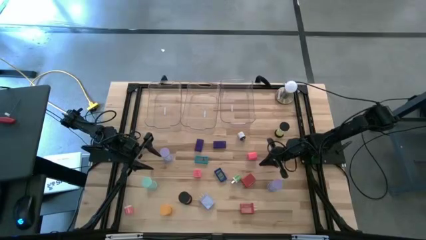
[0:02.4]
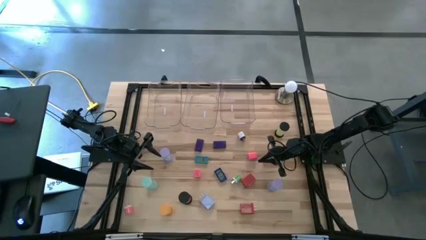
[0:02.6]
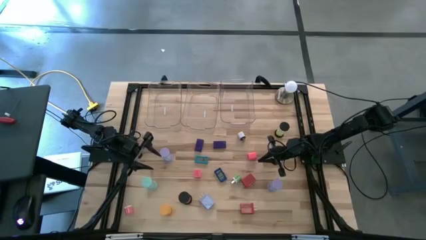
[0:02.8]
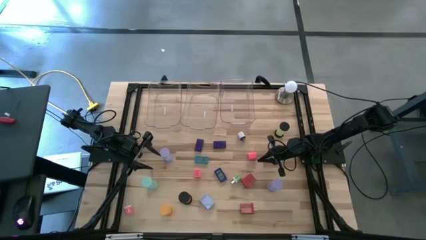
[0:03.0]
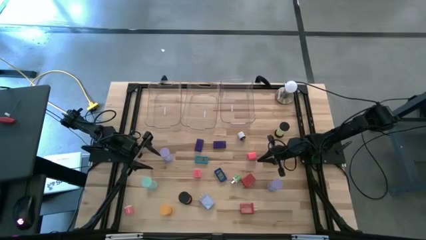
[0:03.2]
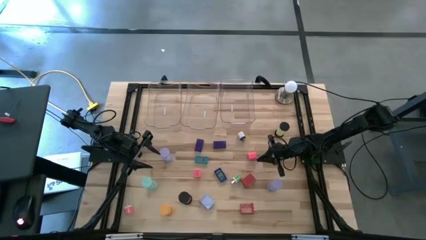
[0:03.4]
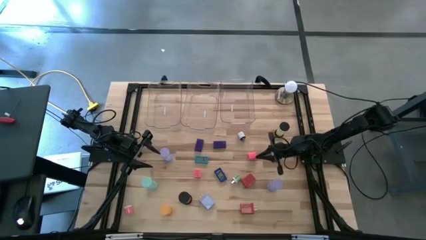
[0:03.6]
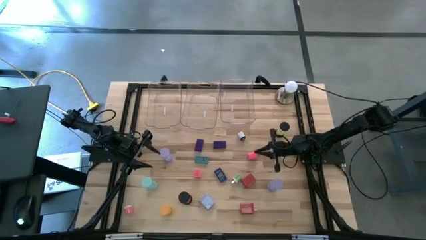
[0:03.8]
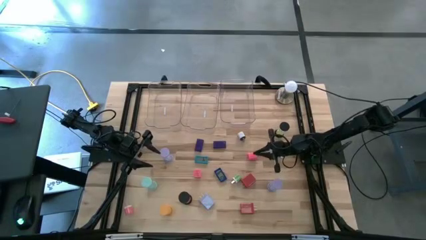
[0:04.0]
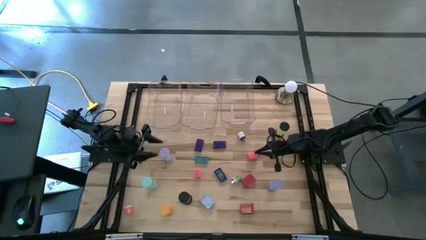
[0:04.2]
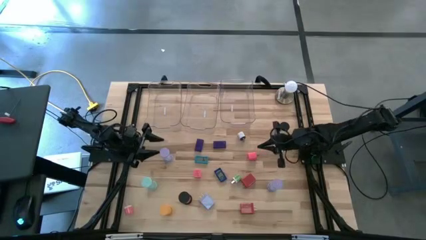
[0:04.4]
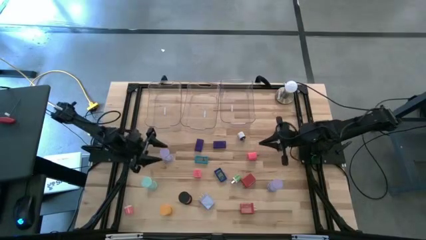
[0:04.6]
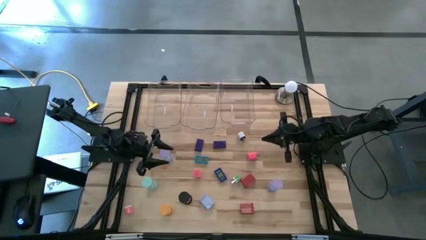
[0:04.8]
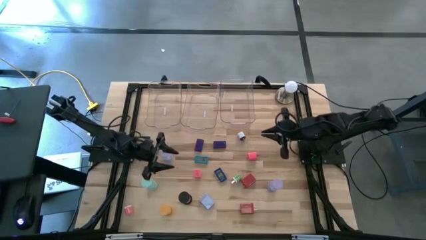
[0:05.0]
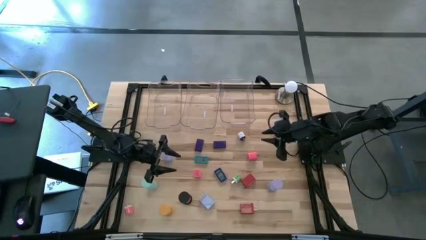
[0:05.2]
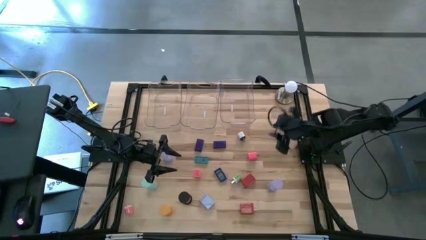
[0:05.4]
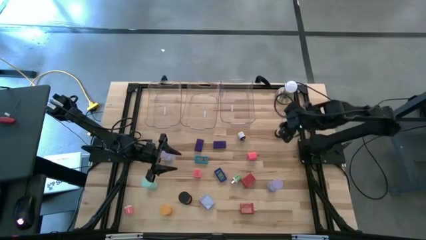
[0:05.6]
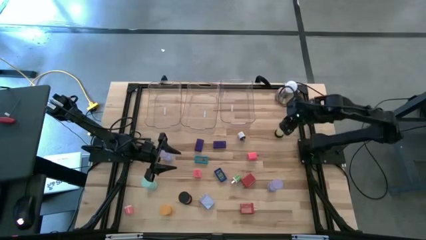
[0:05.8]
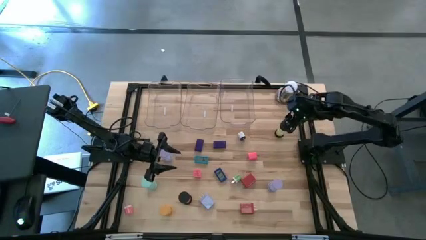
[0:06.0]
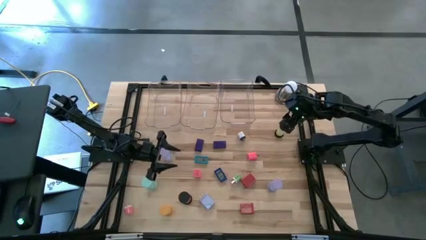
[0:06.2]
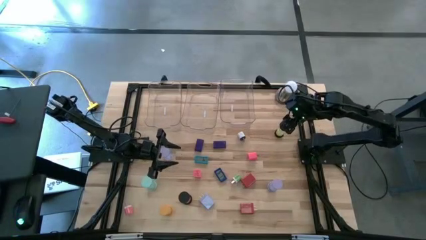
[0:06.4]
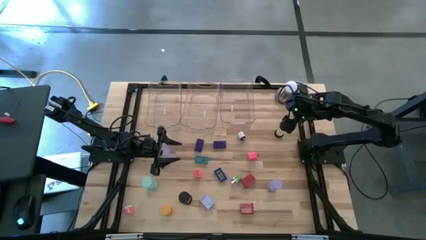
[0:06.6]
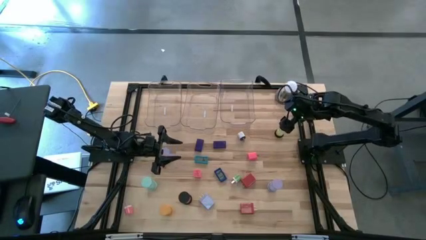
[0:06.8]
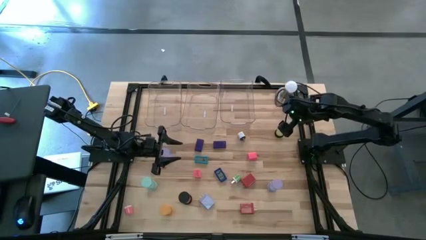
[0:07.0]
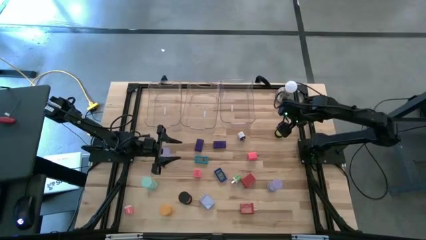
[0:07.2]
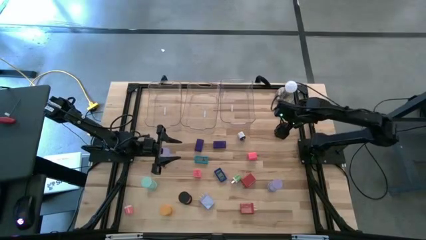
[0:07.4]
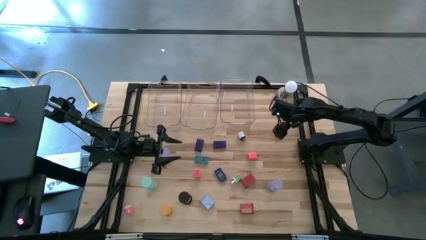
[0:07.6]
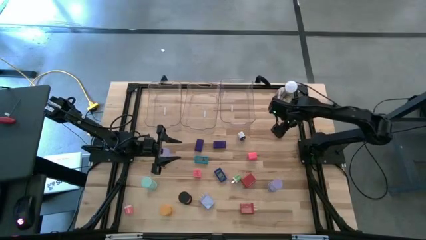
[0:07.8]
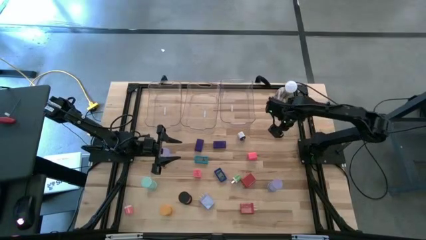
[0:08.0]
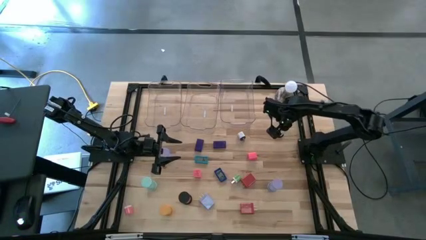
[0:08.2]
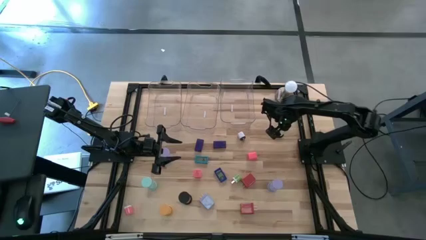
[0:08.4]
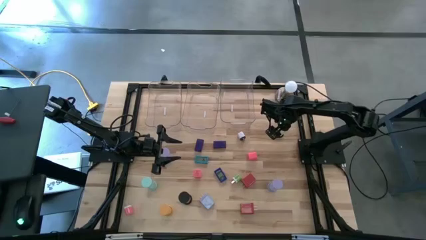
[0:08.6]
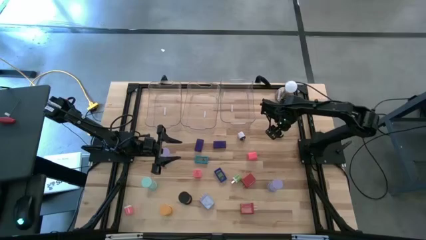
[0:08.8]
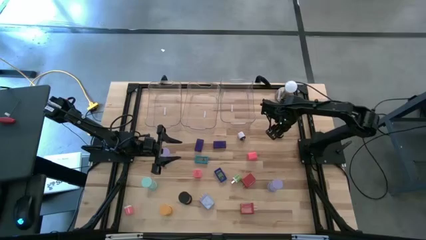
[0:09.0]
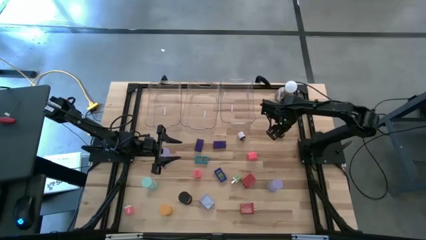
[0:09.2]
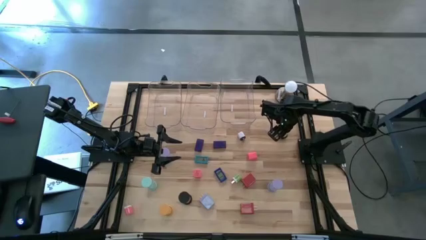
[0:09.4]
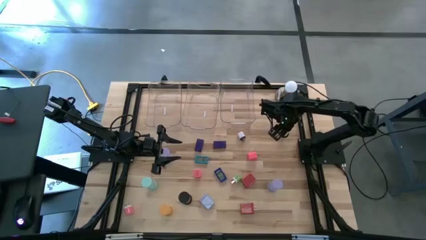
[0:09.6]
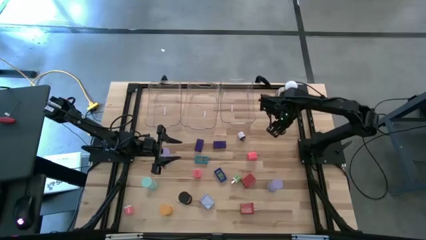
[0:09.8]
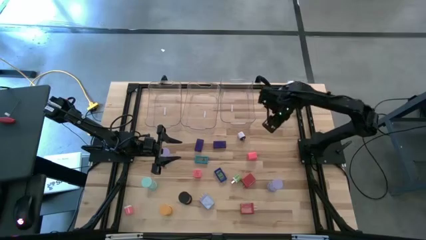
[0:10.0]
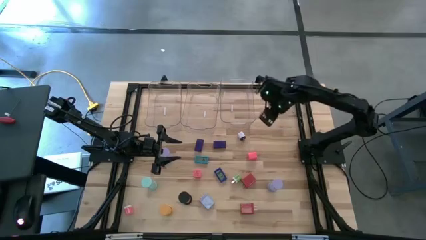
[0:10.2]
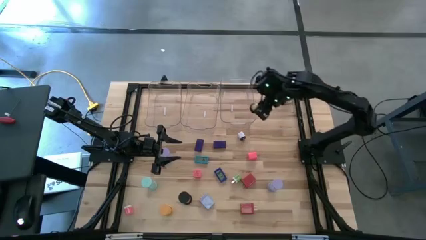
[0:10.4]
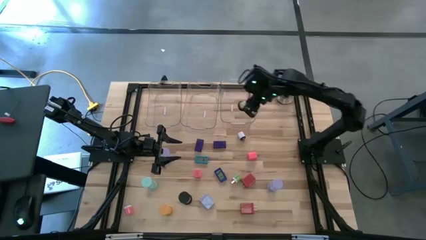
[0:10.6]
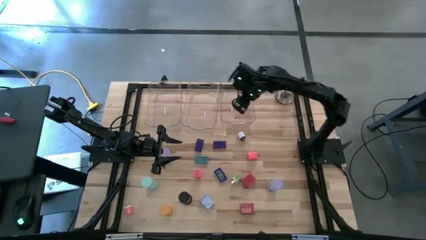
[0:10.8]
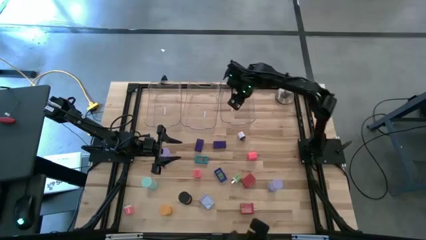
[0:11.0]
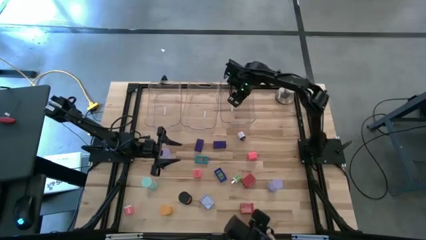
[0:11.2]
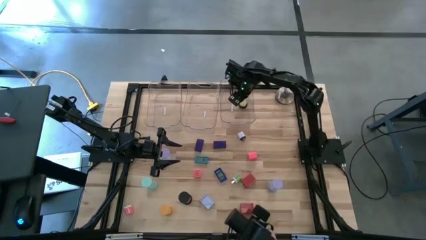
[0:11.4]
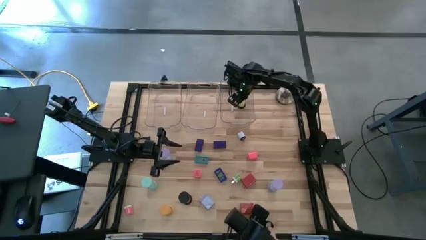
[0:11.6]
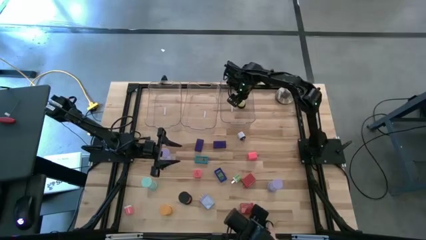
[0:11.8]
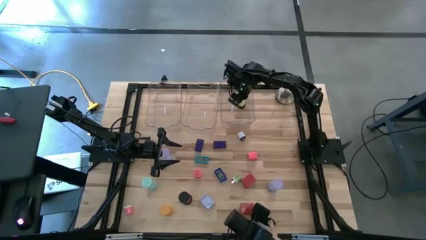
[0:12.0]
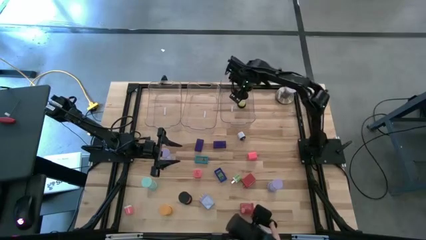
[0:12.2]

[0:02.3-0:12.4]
Task: Pick & Place Office items
Put the green hourglass into the right transparent bin

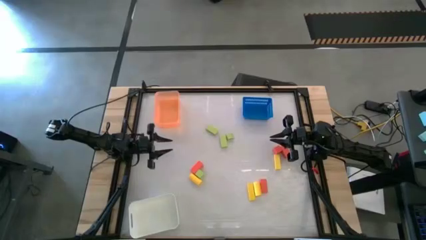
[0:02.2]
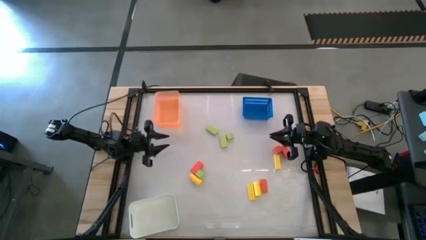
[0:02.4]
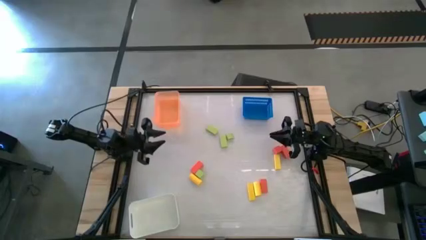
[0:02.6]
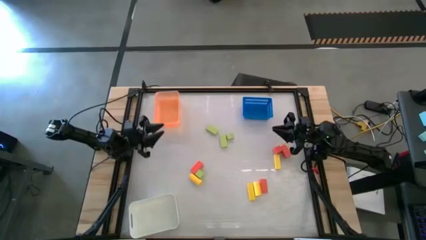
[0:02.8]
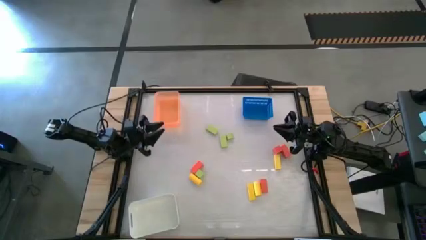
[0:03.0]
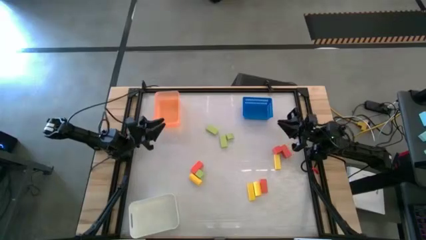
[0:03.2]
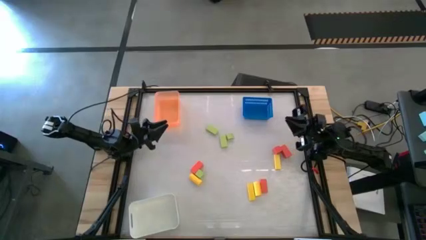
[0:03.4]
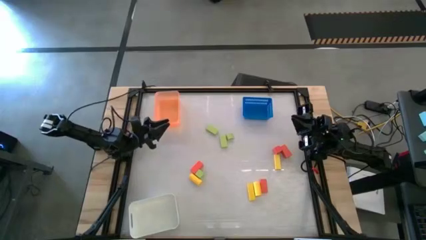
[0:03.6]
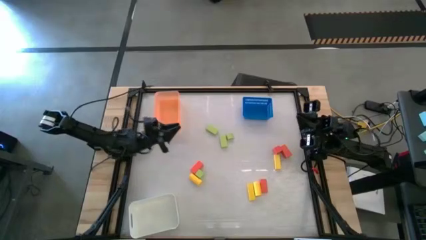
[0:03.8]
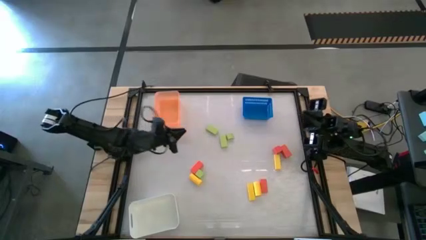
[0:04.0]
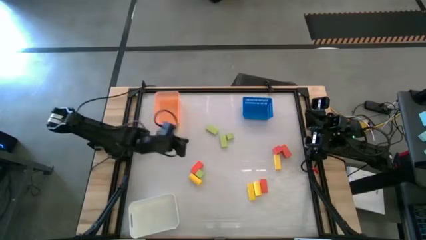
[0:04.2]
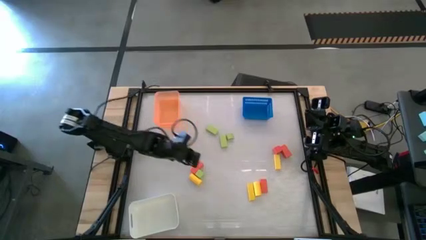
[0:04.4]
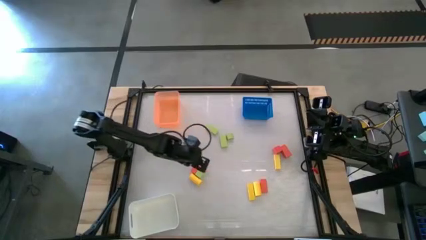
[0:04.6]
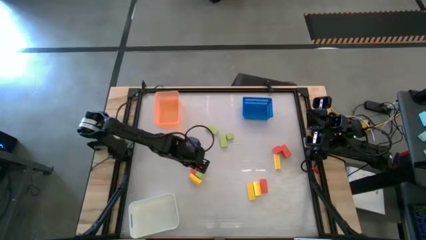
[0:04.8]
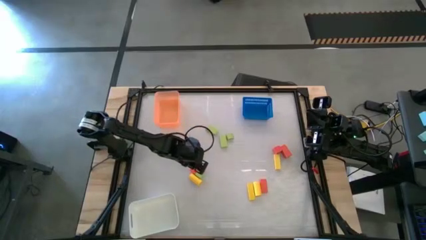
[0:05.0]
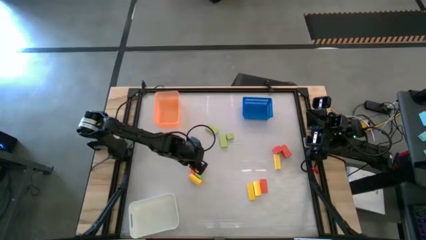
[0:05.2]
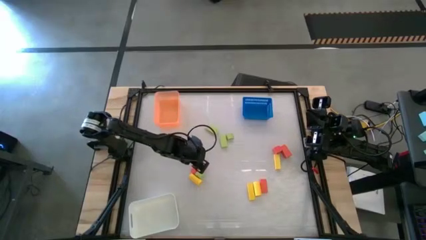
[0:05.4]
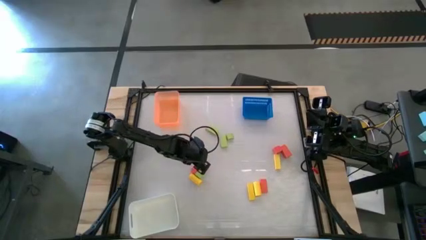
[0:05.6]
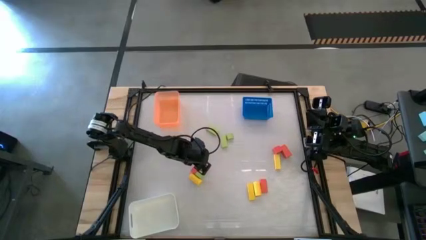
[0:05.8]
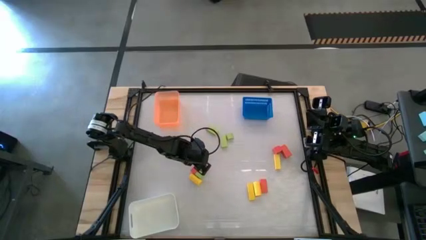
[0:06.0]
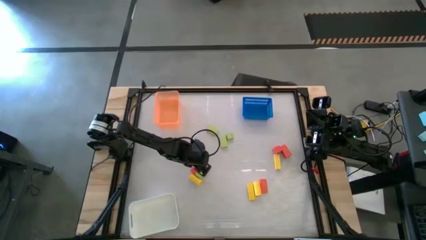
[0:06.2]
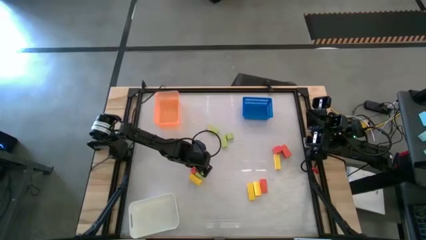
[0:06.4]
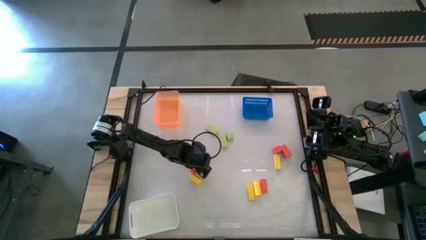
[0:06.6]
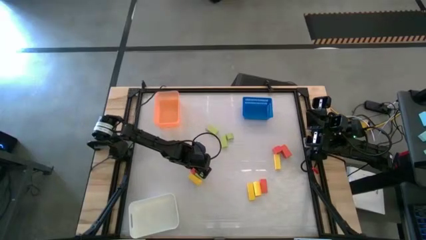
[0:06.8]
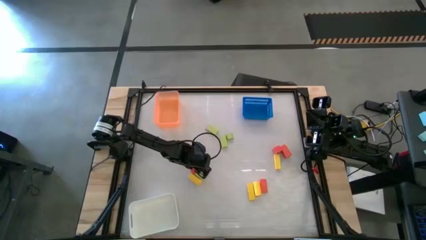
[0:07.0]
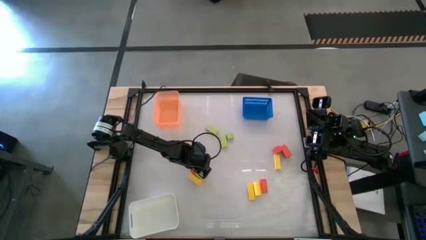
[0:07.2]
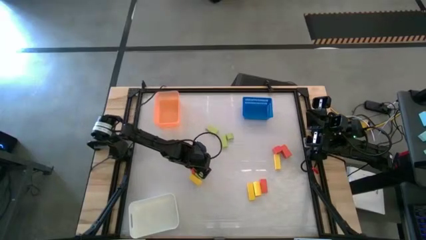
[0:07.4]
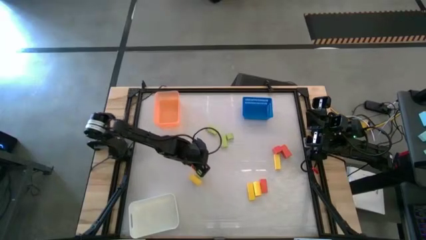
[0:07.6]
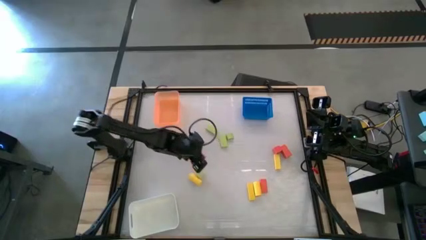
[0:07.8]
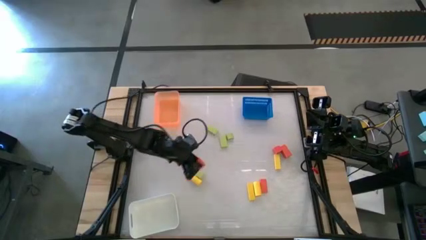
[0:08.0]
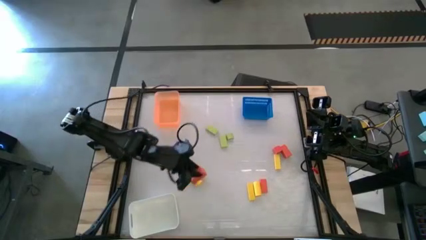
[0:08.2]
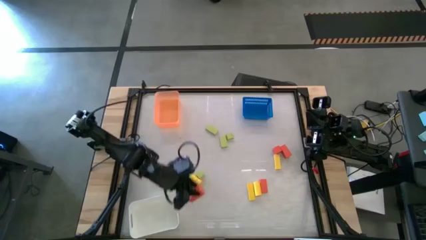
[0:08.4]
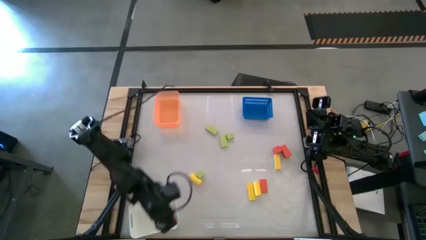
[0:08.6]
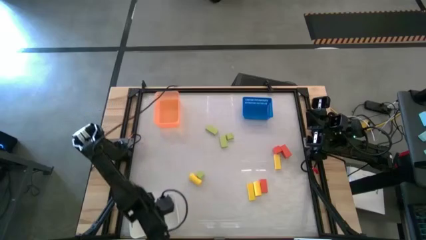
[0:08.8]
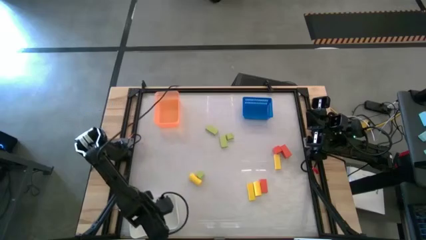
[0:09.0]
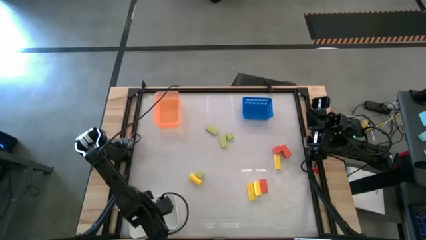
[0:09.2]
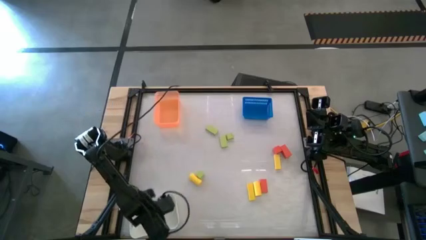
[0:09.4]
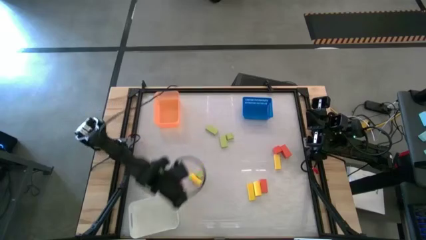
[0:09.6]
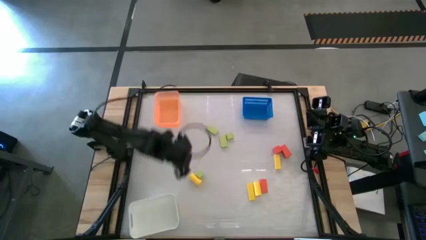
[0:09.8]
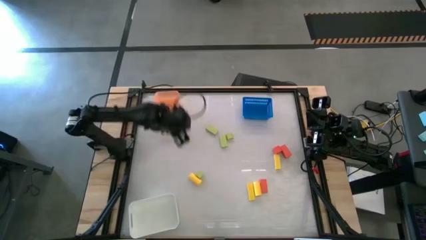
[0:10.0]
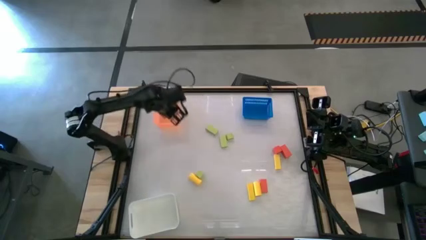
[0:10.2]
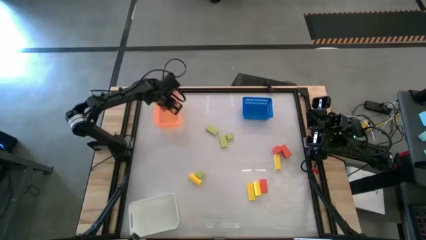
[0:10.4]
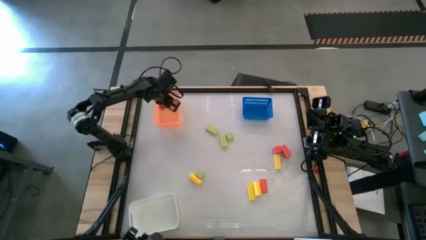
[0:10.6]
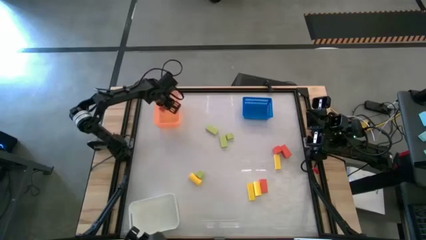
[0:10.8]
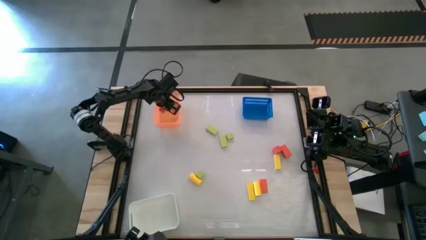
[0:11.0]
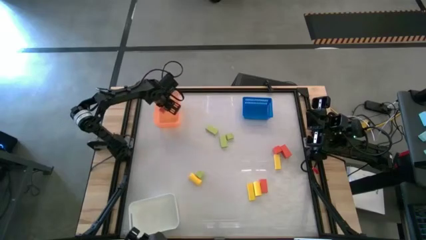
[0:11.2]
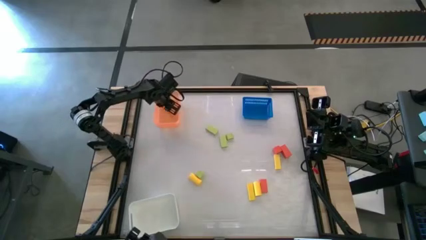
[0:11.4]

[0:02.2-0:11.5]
Task: Sort & place blocks by color
Put the orange wooden block into the orange bin
